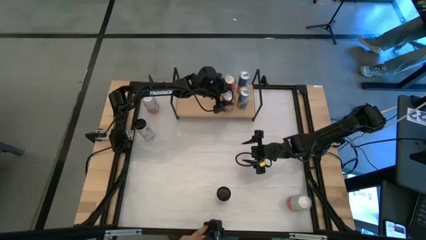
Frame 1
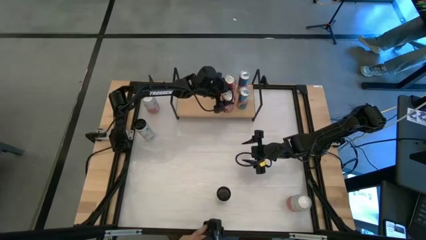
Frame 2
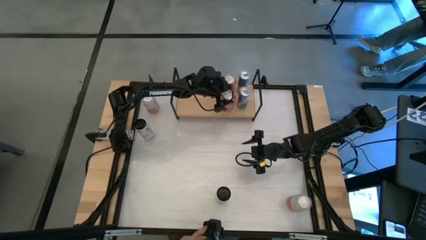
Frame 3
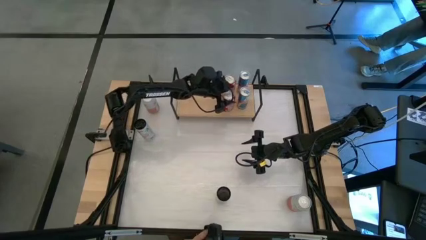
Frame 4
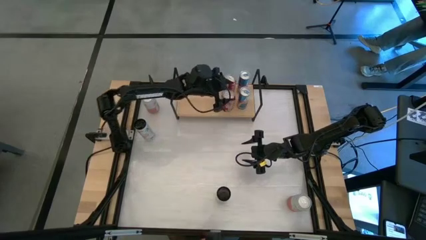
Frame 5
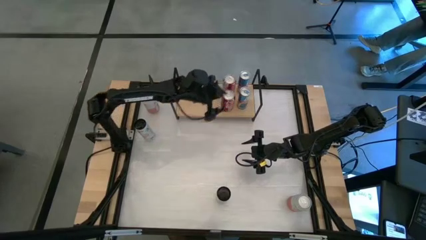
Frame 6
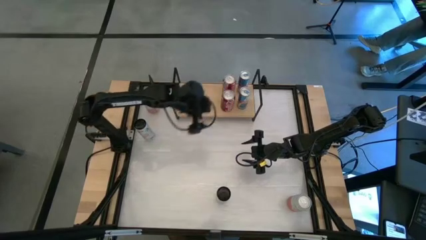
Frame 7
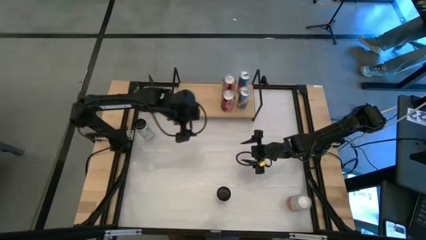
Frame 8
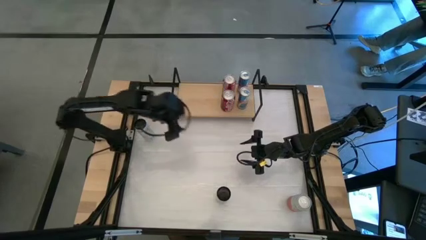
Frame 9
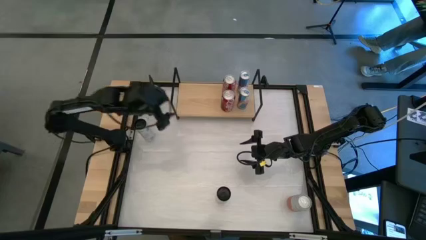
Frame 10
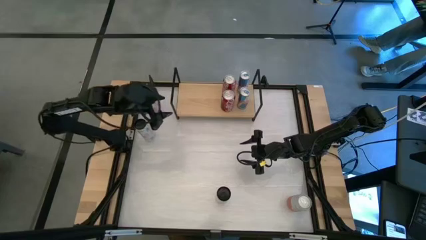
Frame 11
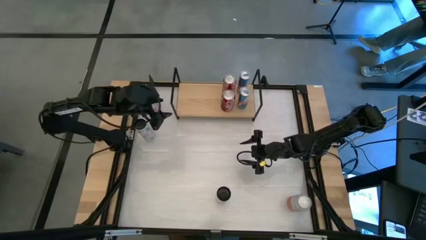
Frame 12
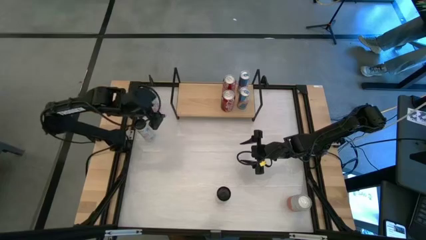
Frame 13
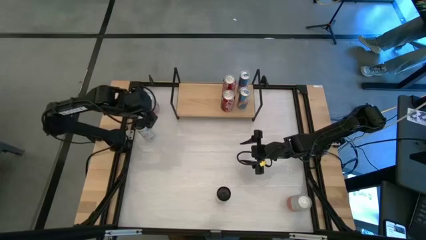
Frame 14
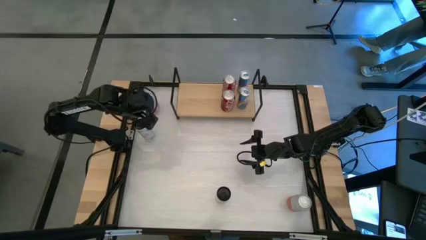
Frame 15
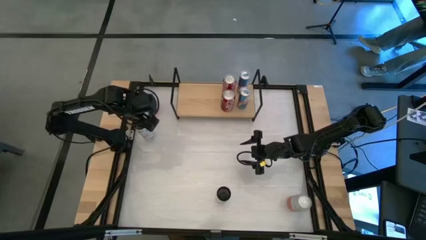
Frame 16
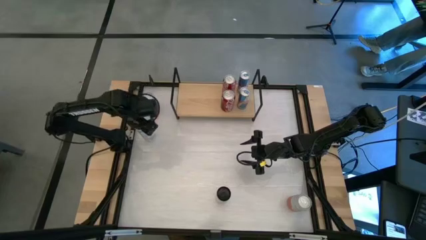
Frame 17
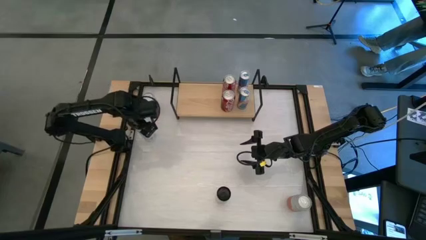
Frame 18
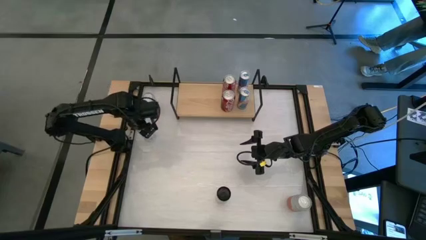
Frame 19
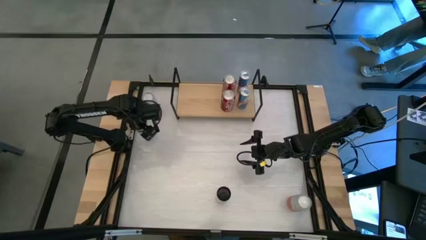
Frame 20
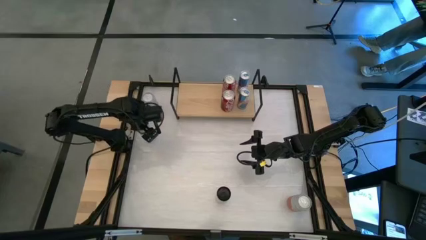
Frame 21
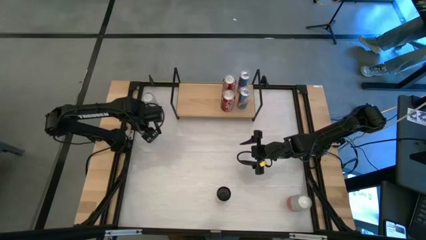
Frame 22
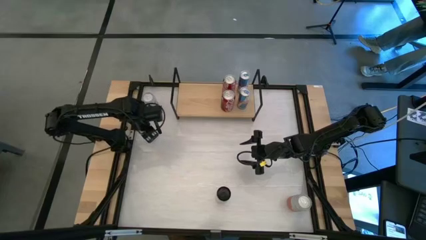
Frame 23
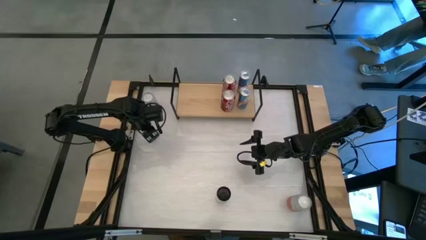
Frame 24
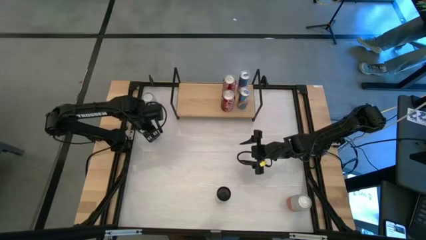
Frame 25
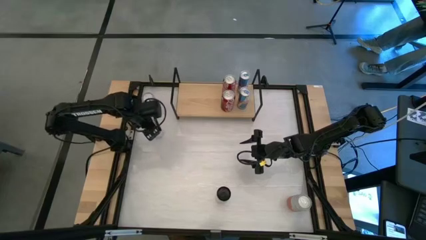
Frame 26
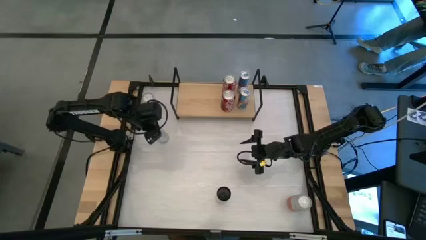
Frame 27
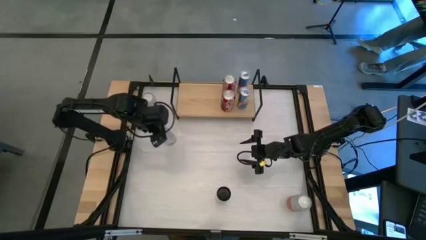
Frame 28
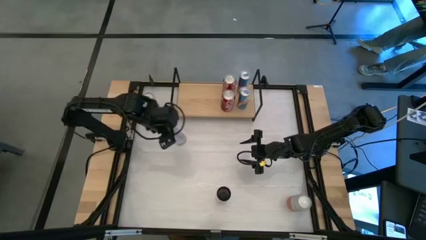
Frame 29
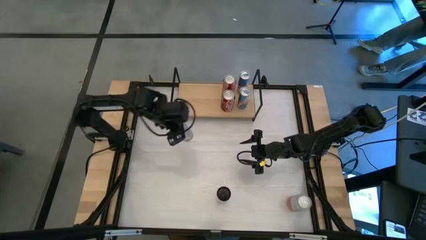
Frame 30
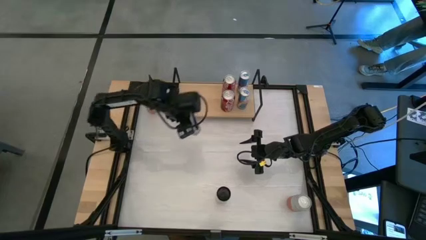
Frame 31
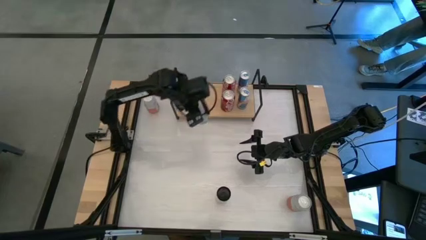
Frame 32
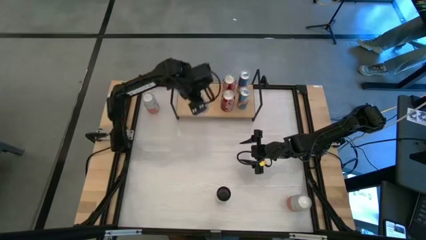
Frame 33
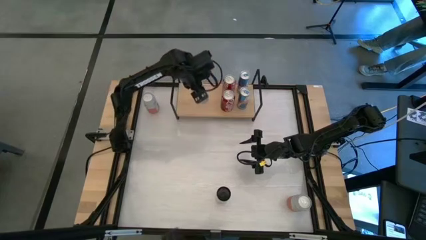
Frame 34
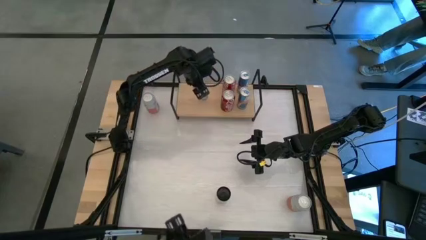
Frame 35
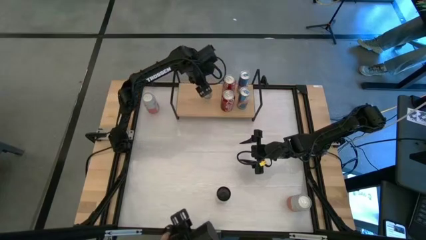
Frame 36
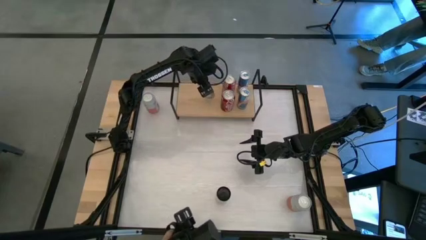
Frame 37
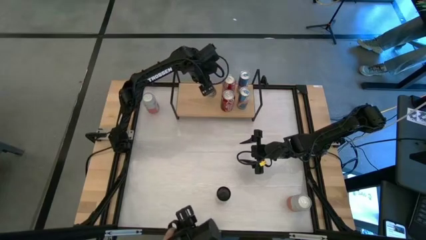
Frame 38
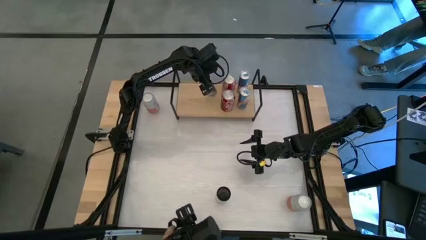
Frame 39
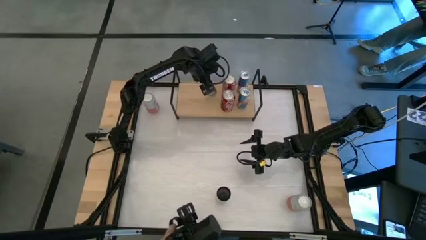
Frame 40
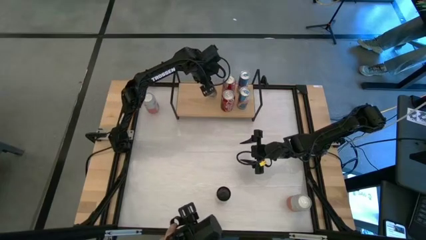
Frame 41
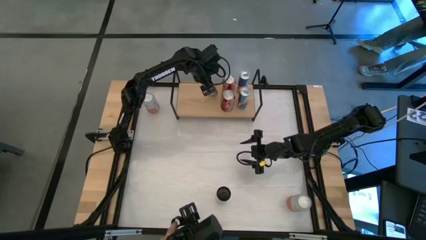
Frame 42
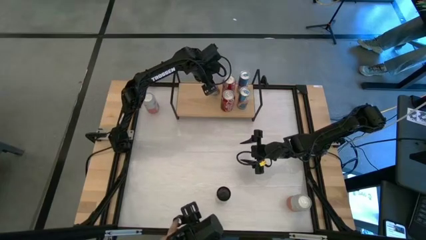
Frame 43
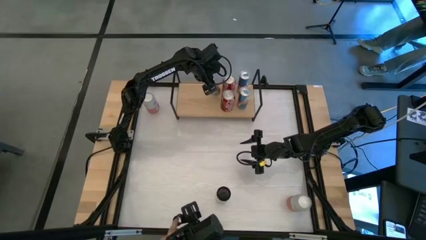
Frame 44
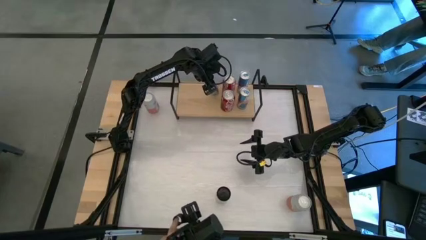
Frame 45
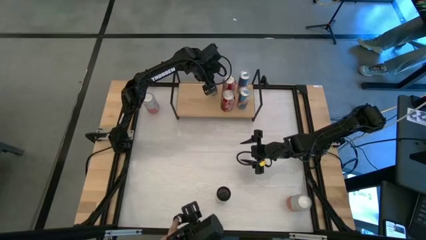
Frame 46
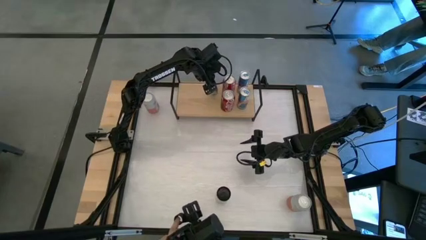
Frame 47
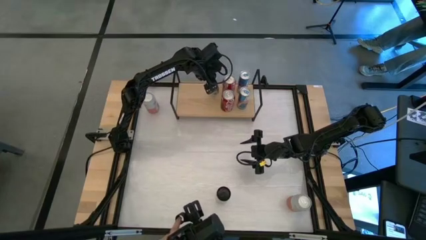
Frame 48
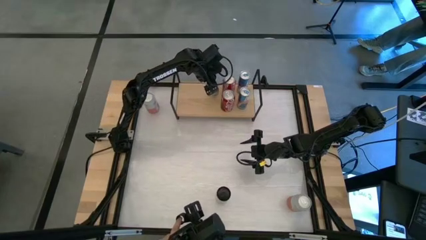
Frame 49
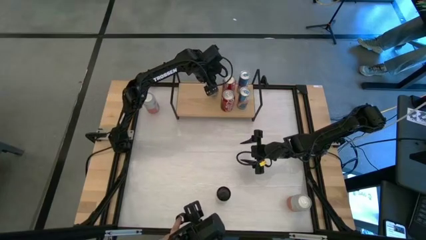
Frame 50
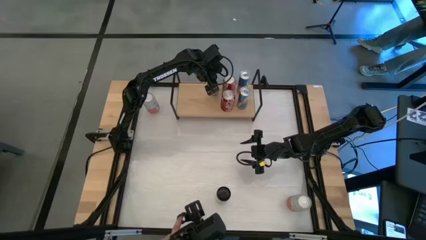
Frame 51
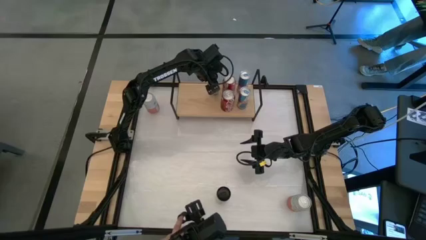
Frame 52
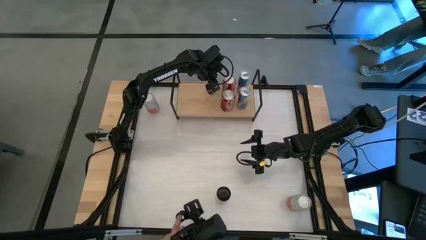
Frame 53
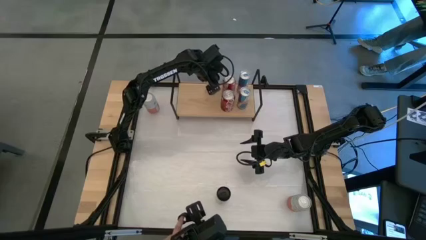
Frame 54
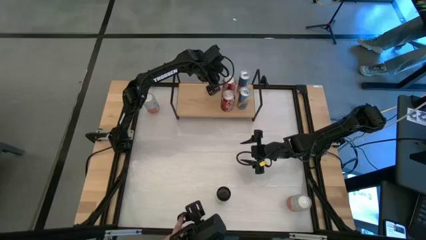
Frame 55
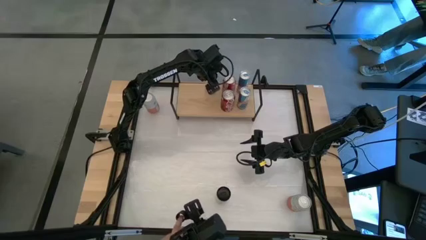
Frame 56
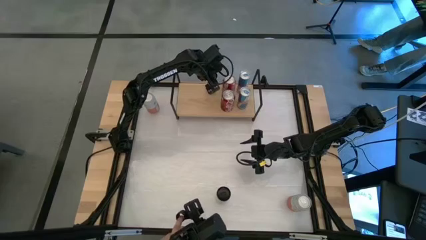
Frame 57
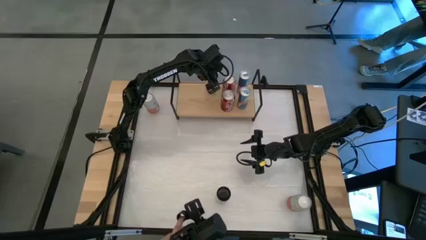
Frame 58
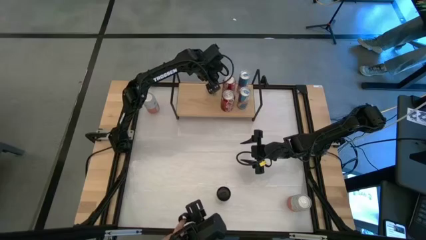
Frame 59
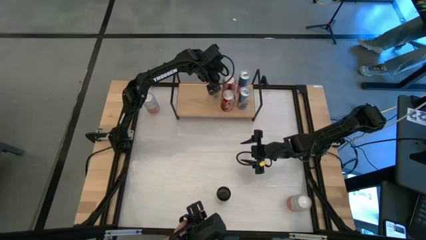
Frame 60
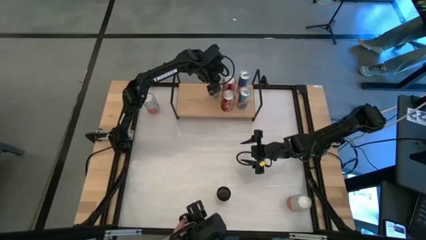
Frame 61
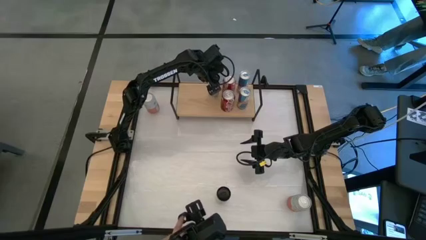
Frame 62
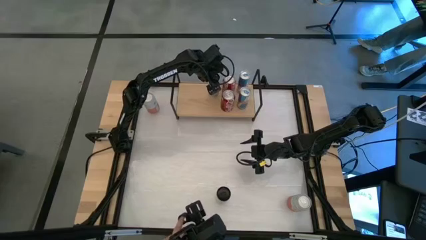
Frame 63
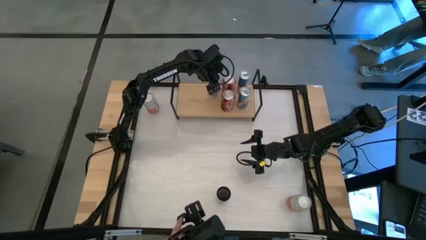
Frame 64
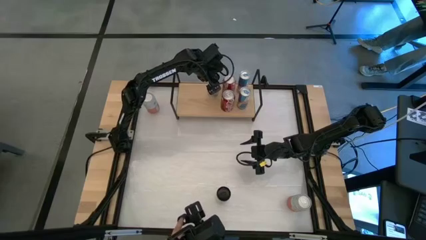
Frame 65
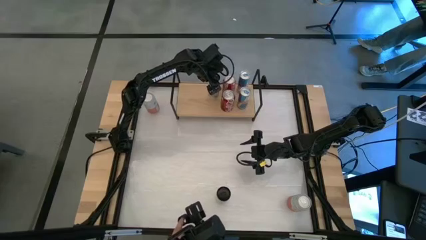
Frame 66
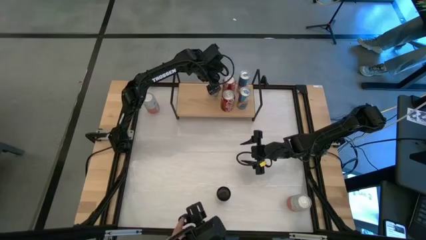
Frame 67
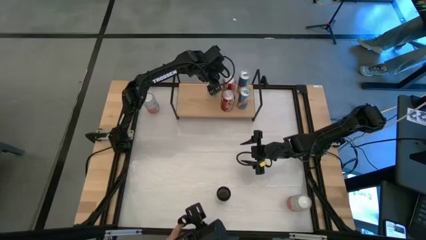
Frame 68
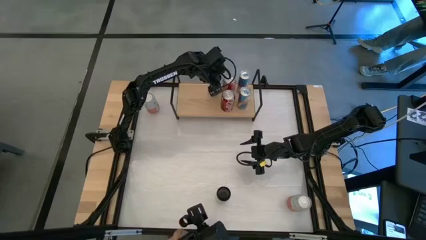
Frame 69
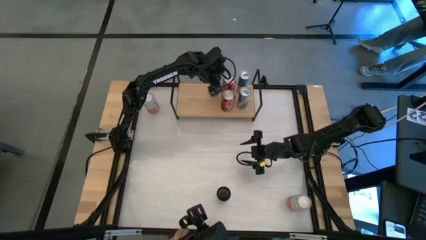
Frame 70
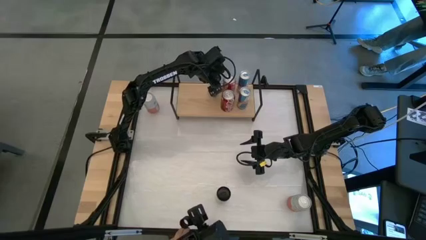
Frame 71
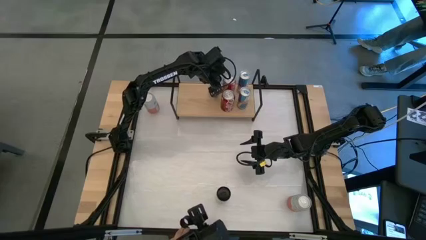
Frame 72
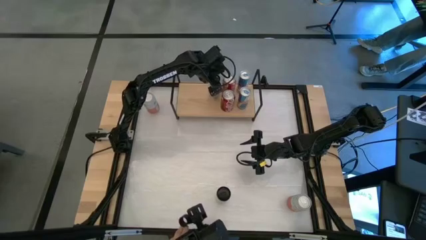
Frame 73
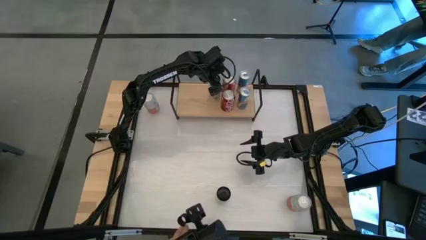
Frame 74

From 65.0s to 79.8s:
Task: Place canned beverage on shelf
Put the top black soda can on the shelf
